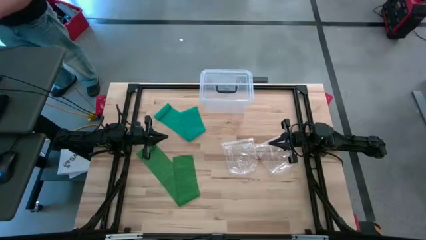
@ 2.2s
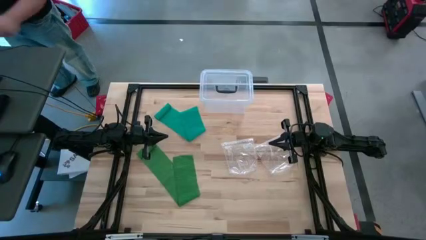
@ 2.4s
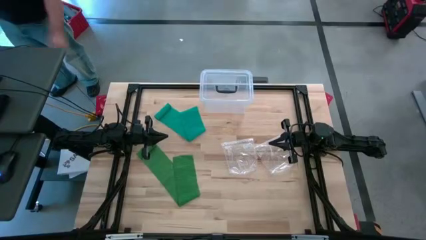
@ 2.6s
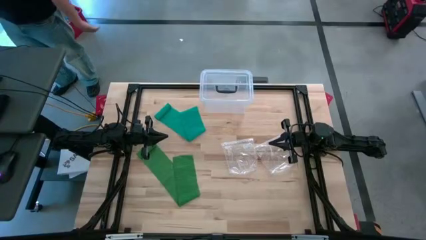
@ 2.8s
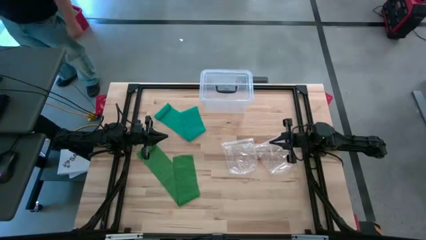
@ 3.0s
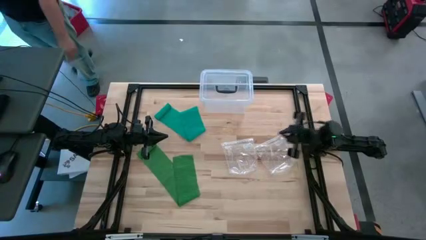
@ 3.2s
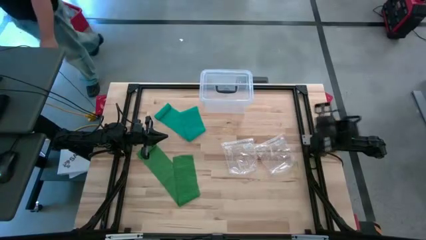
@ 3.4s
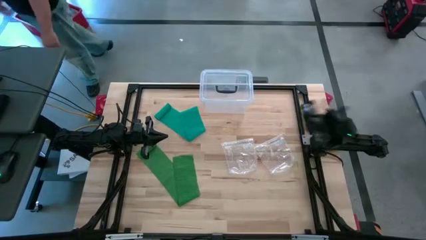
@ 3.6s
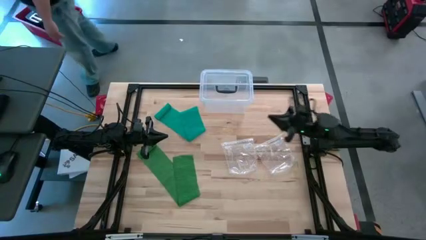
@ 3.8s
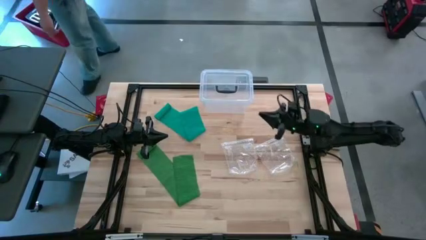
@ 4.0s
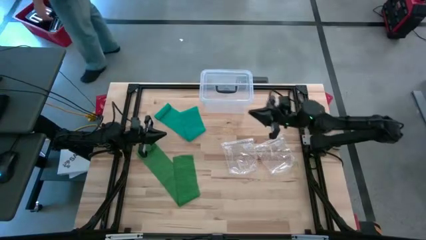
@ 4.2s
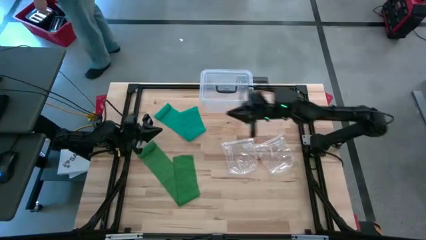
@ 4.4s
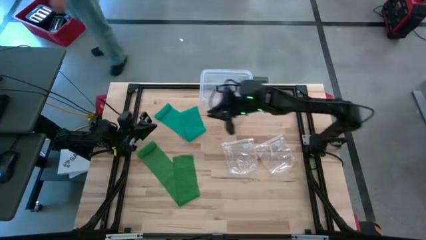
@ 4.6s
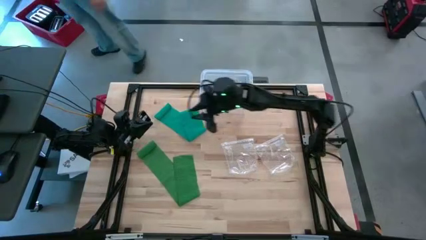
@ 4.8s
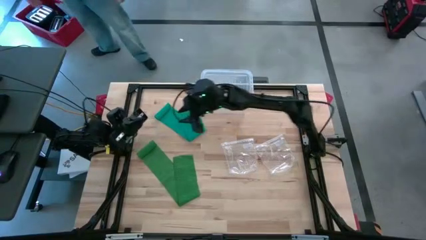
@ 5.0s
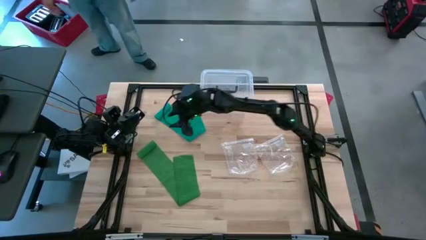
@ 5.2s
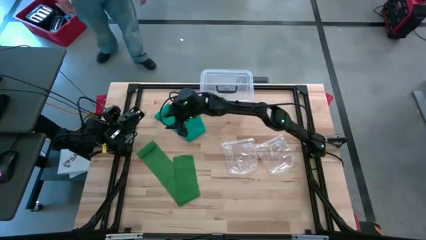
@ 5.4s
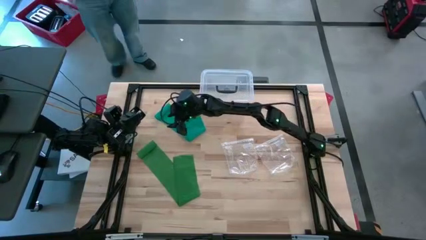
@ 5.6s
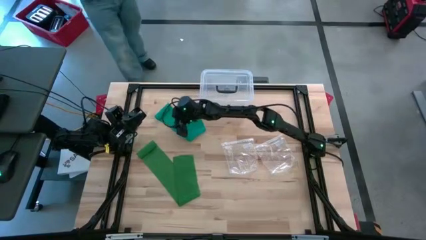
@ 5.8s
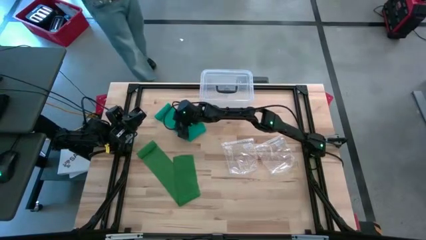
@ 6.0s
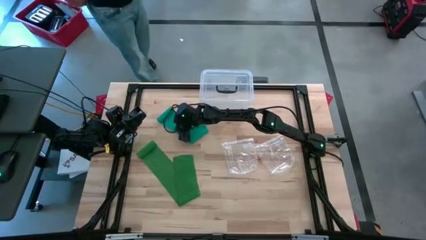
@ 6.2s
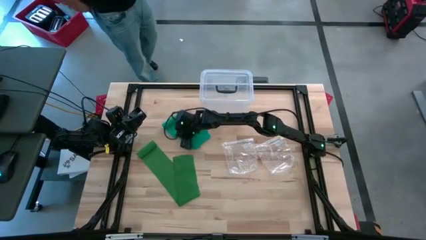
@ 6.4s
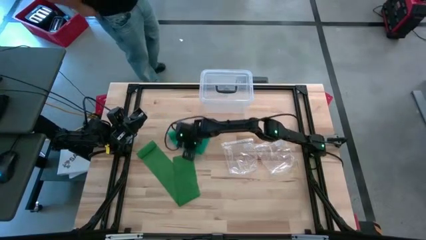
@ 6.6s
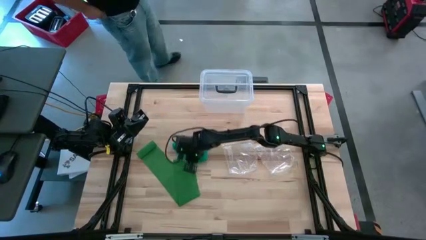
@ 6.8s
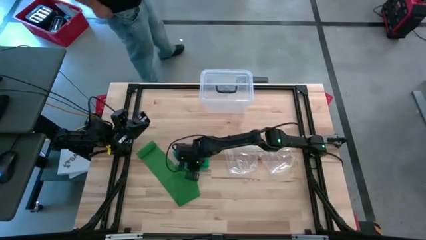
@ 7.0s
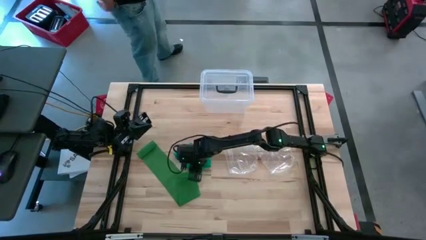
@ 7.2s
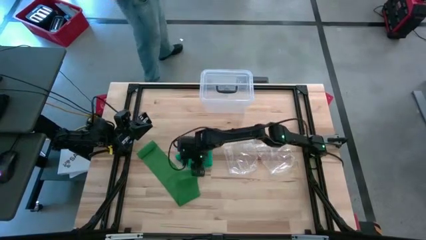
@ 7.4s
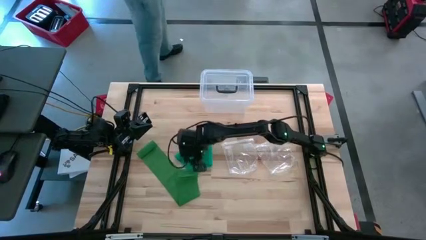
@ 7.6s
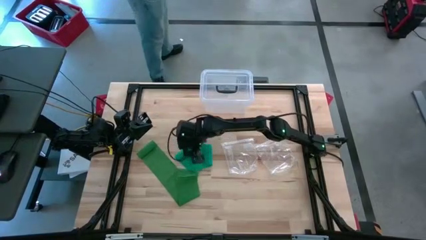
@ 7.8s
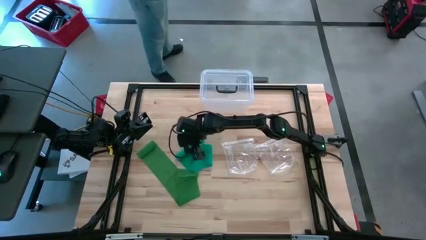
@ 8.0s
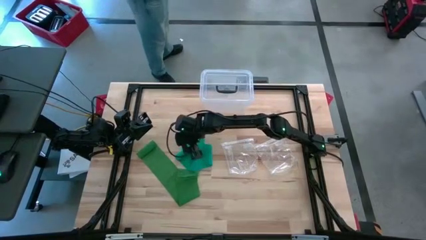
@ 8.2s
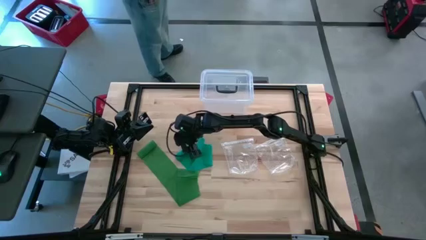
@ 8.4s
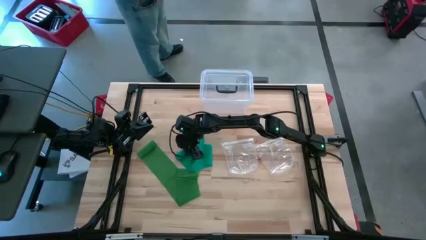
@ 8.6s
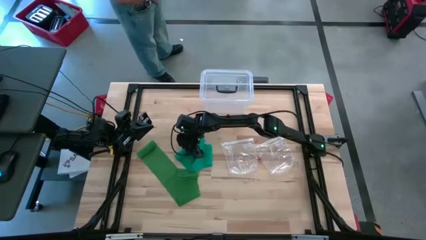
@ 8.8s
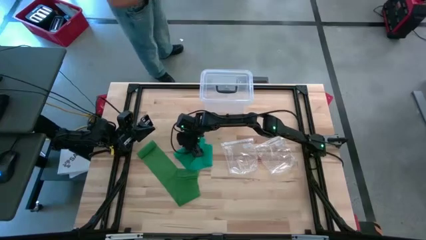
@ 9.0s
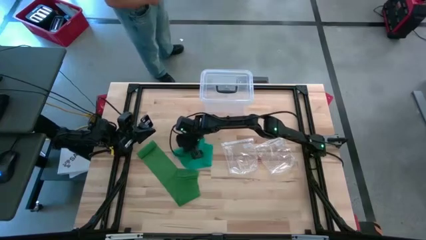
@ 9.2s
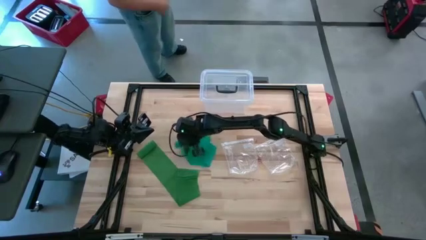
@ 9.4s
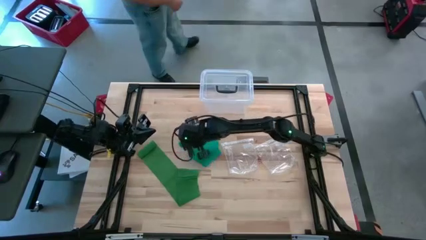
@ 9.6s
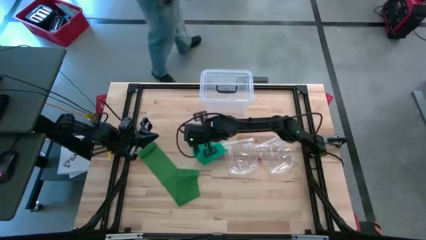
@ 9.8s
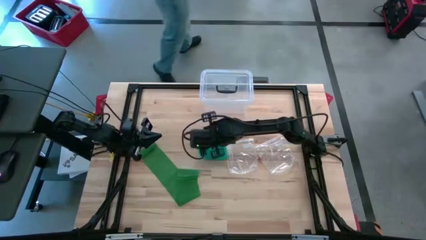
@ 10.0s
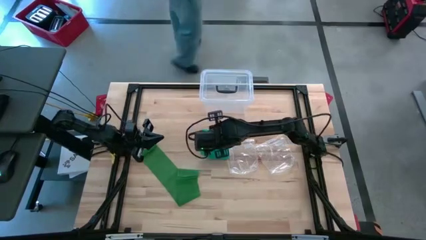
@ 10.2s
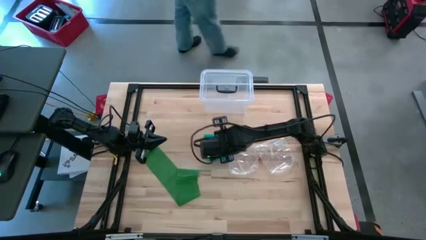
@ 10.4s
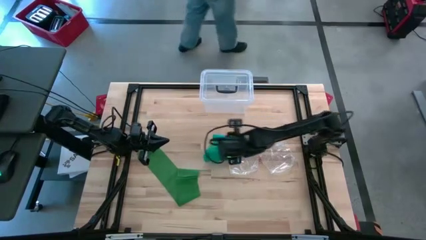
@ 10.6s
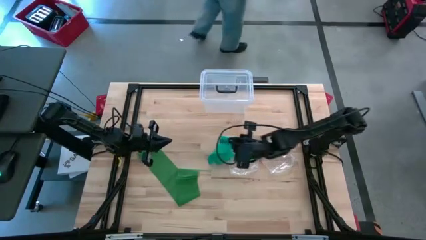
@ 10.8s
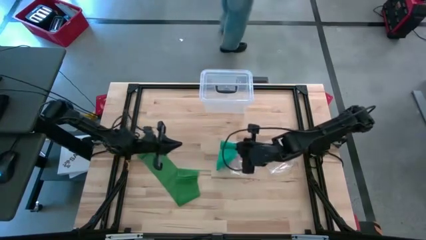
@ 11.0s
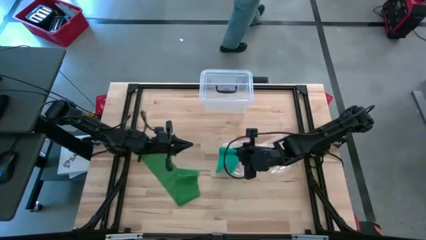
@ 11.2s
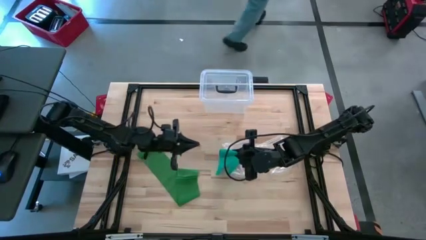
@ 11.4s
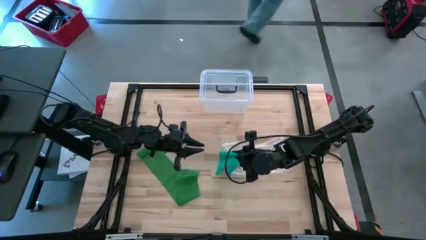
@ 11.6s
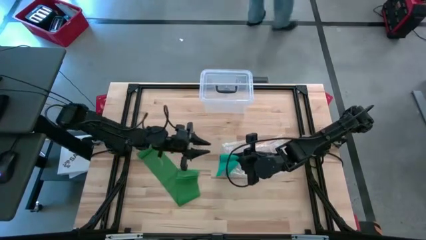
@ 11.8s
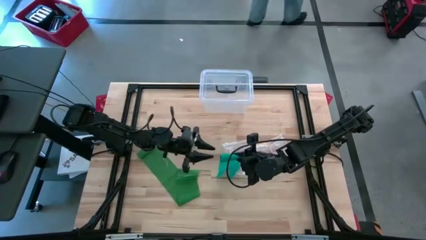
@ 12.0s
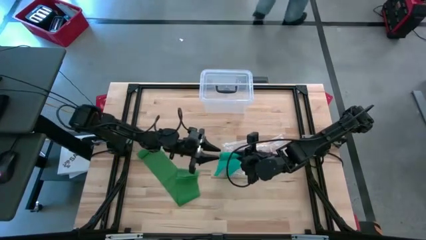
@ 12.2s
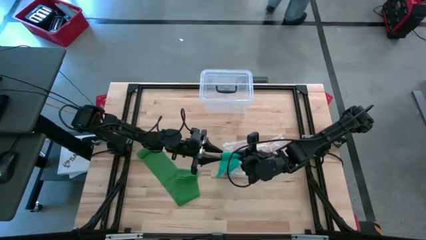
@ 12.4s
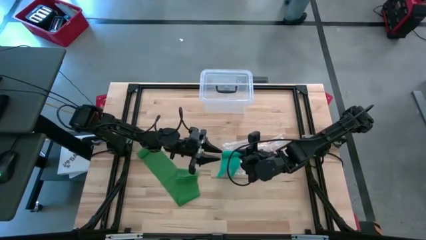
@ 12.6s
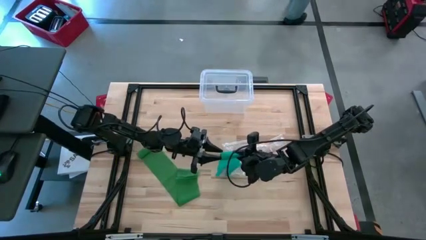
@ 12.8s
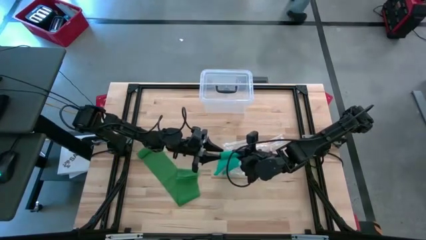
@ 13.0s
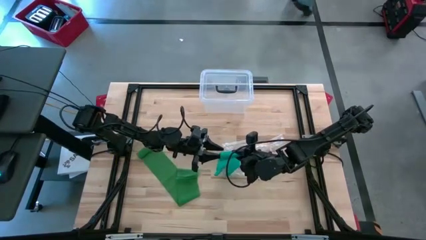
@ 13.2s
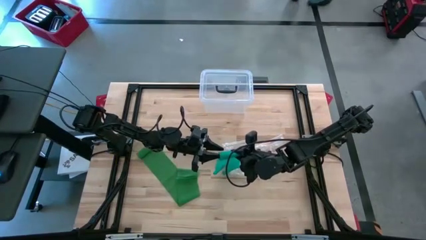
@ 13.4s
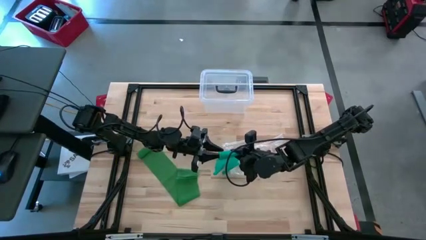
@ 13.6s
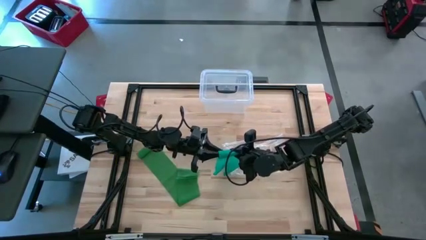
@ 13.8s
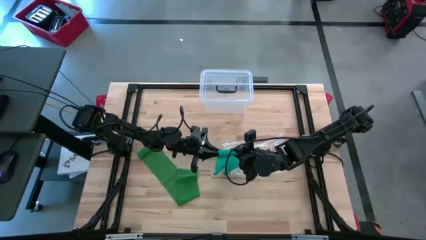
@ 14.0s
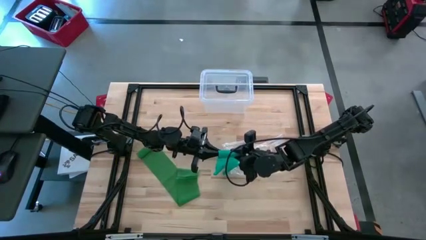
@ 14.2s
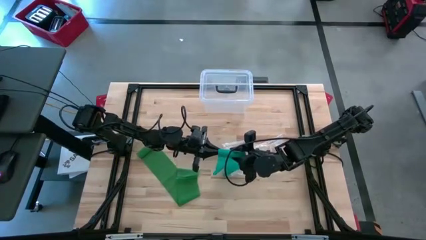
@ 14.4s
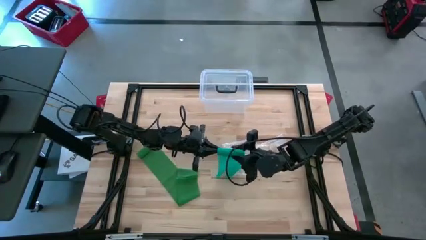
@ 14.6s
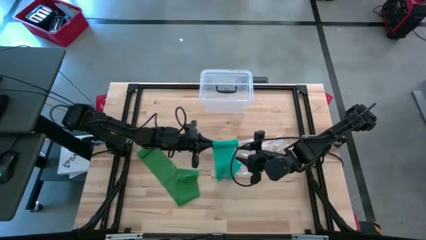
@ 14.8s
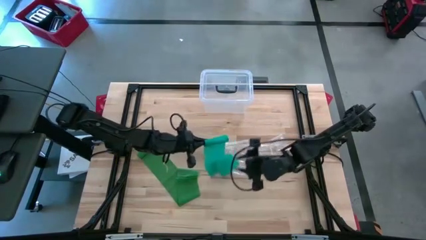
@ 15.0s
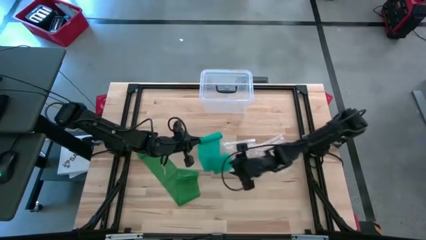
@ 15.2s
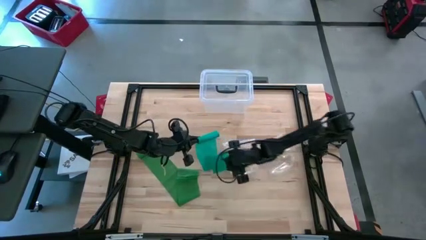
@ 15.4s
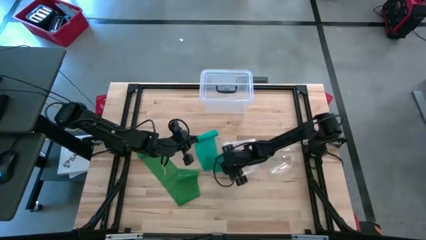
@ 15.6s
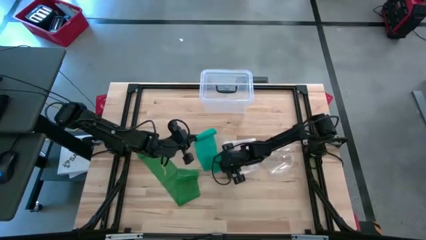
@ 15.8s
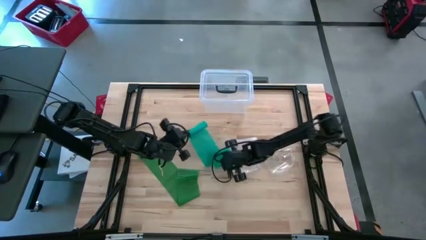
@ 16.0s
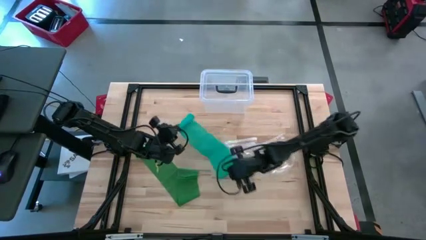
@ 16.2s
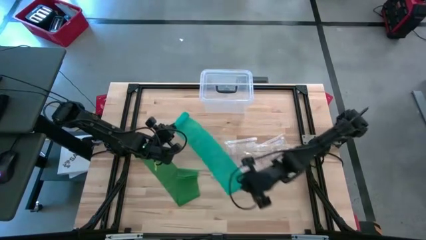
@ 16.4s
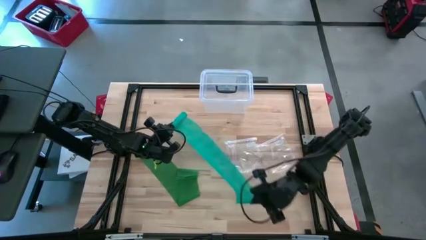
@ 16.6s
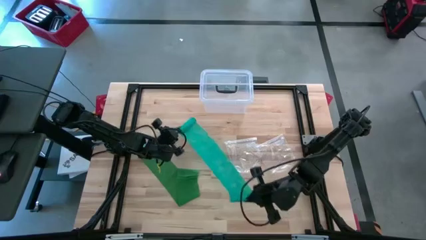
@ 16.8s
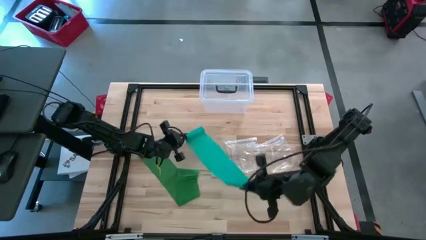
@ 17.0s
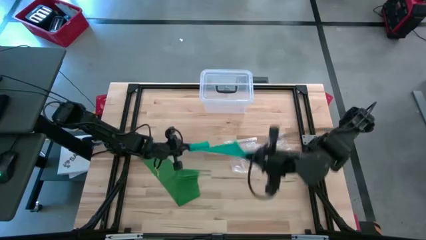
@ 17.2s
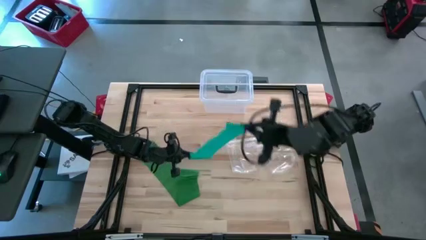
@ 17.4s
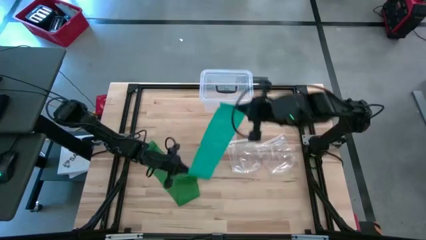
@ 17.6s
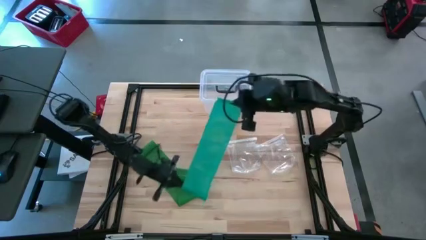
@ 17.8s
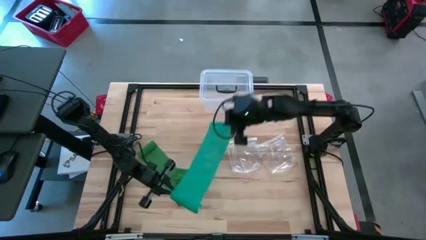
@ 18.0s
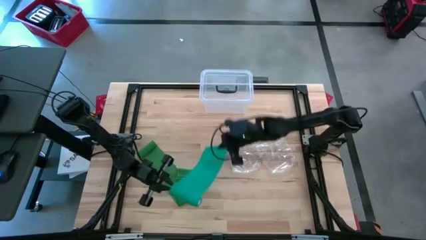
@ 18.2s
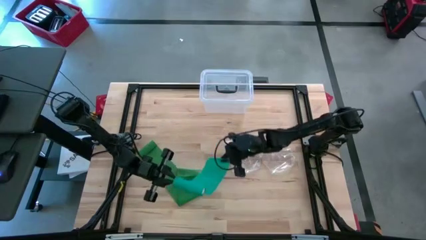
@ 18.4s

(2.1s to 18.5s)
Task: Roll bandage
Roll the blue bandage
